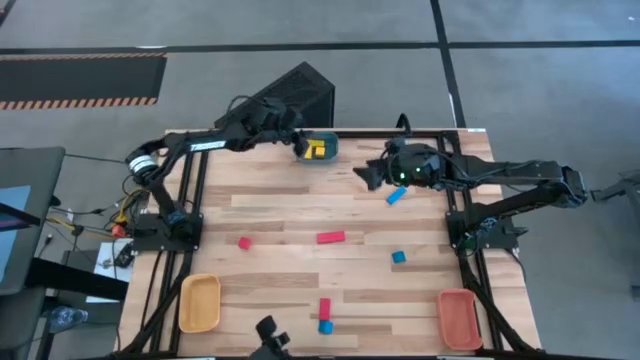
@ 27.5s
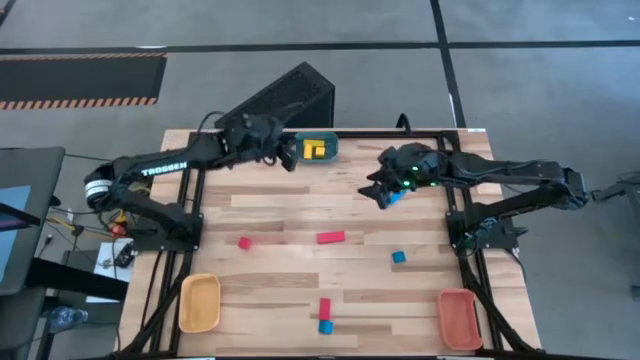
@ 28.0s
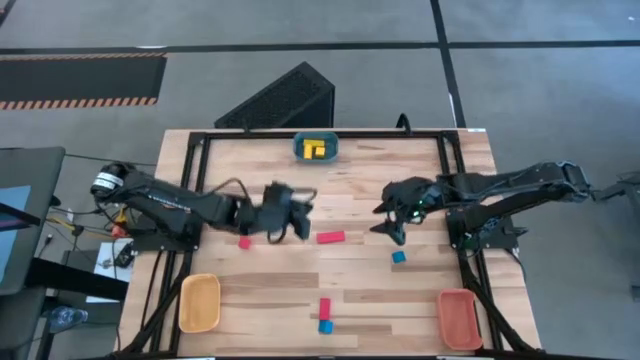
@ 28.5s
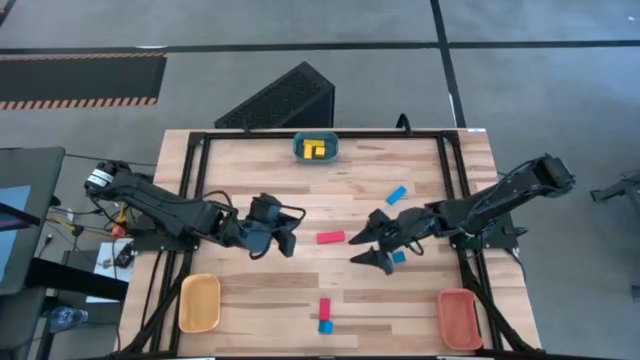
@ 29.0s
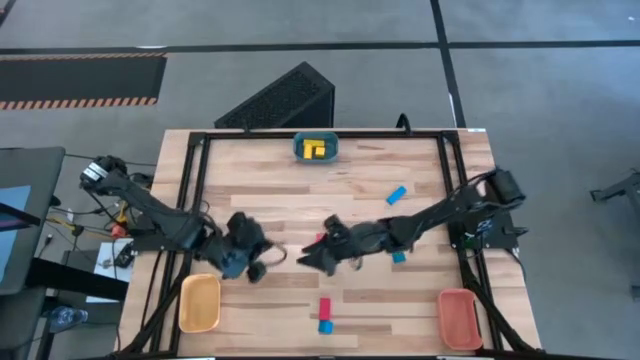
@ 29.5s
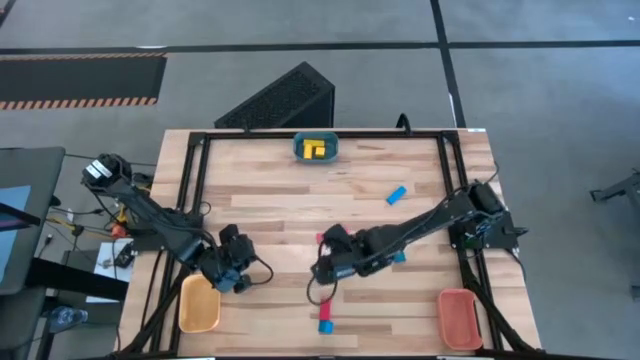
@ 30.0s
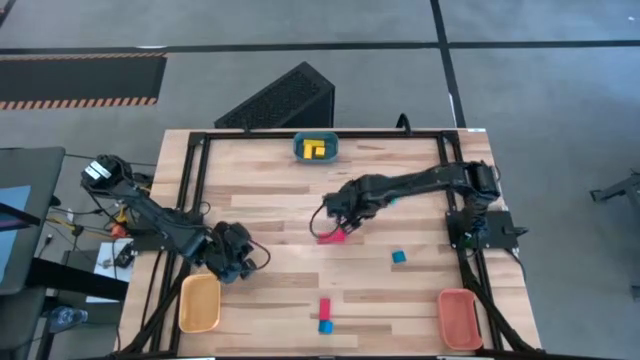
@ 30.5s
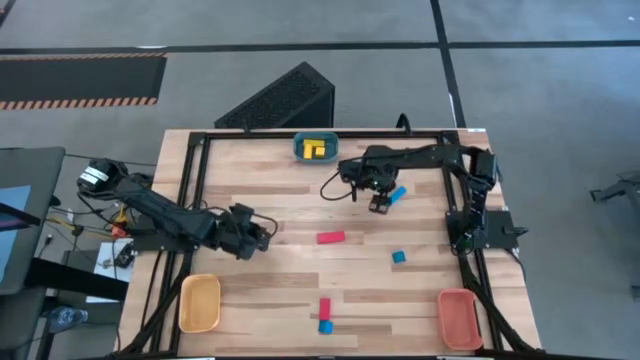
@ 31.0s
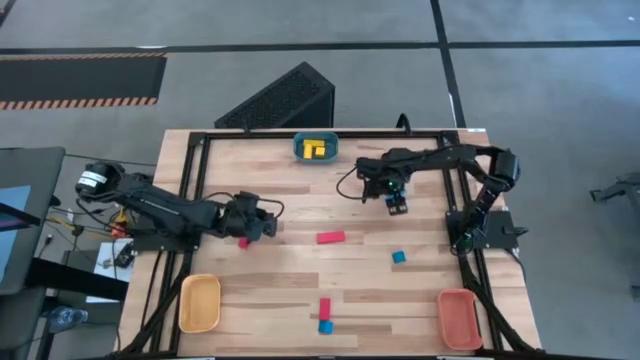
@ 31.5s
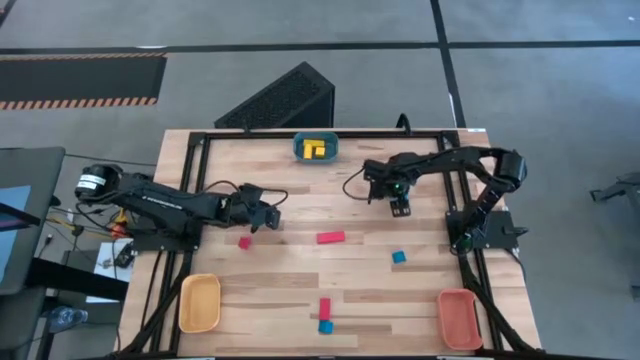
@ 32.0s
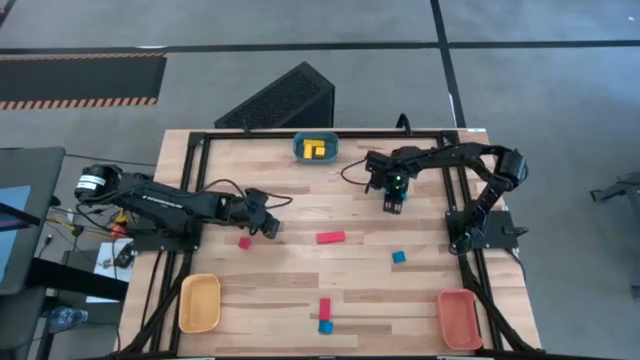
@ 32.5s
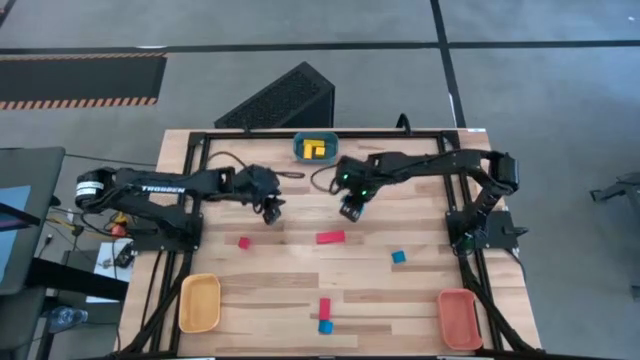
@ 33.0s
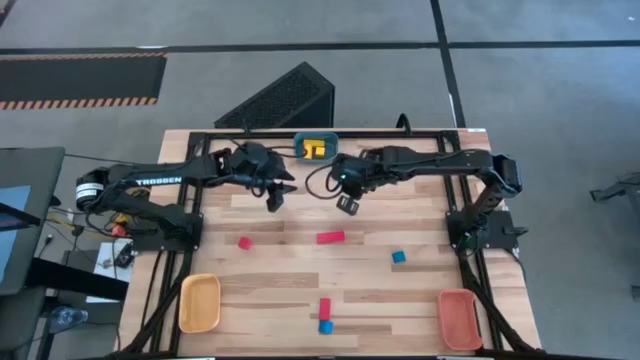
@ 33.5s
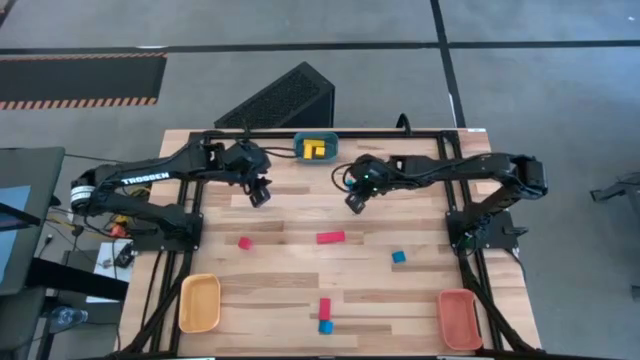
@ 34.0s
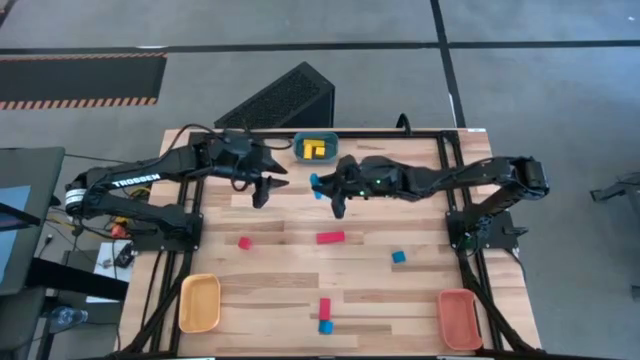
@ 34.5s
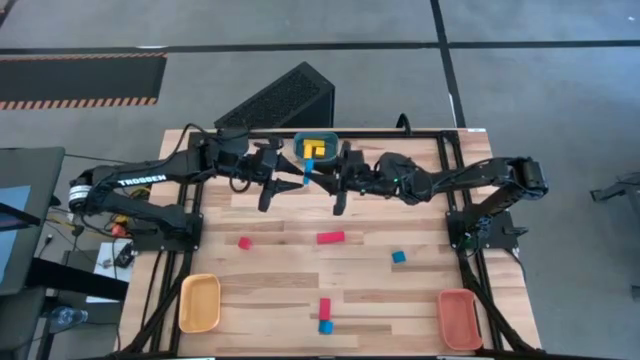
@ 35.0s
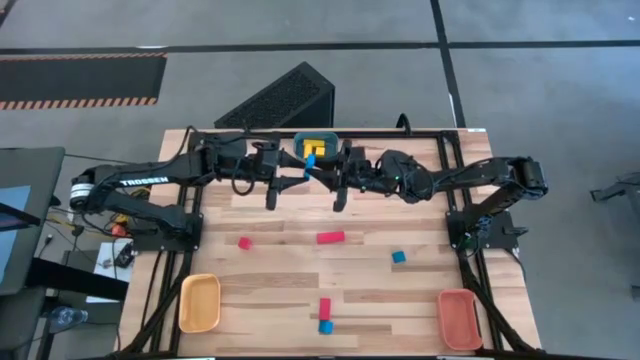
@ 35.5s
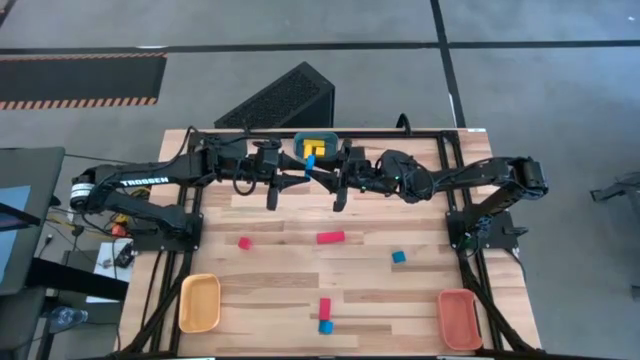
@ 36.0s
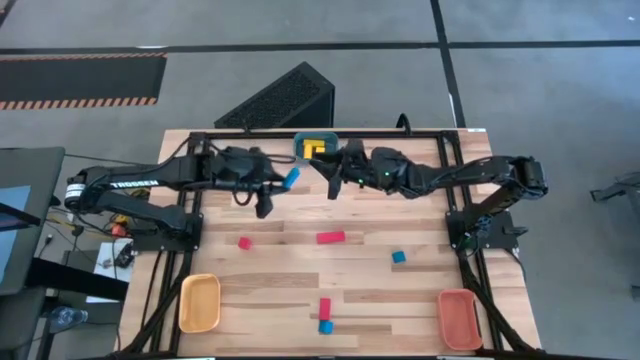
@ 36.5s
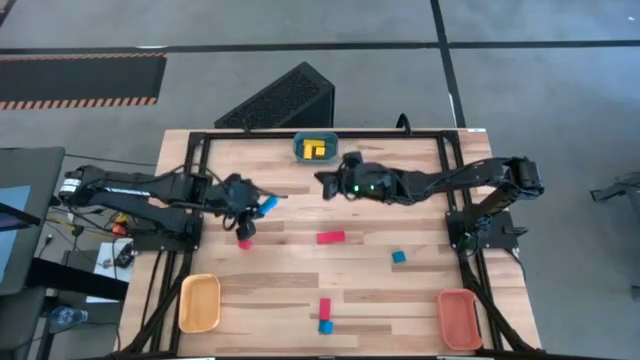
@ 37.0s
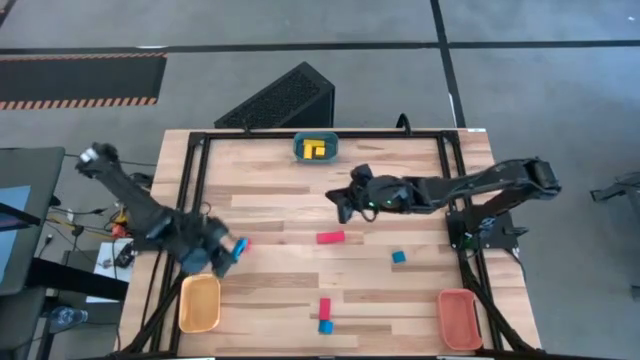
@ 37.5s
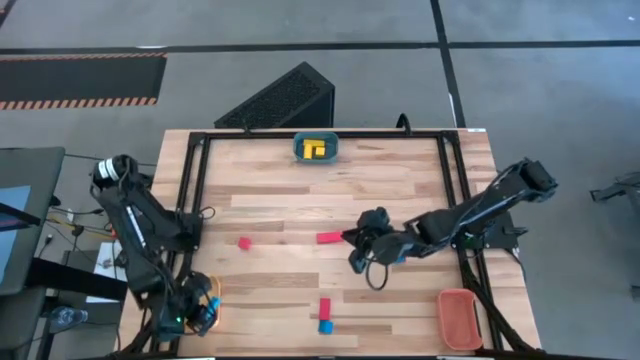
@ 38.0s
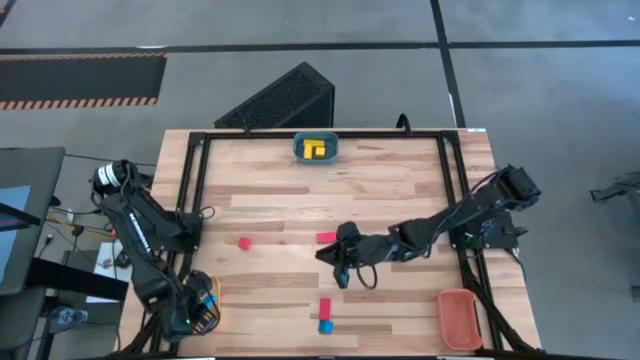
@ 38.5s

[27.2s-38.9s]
Task: Sort & place blocks by color
Put the top right blue block into the yellow bin

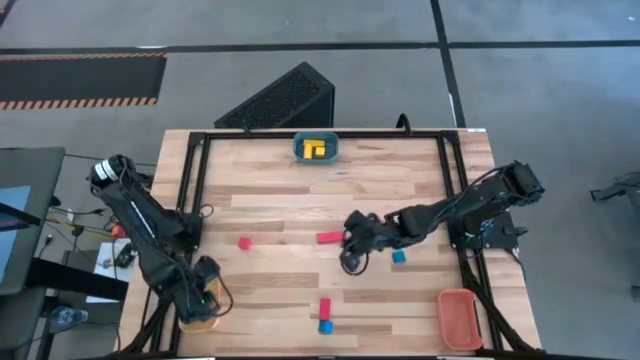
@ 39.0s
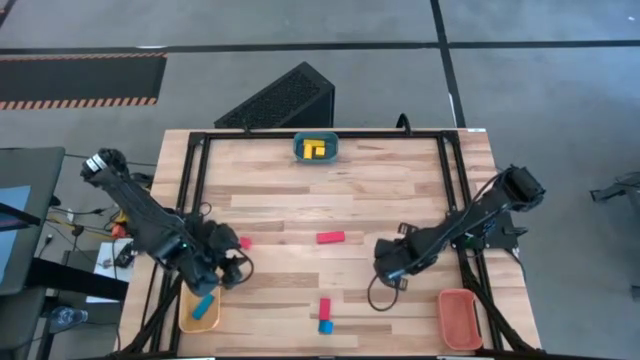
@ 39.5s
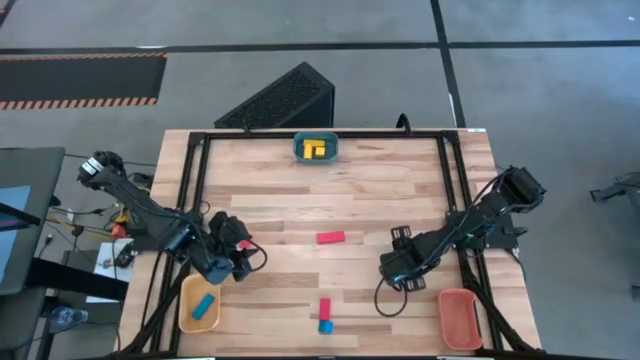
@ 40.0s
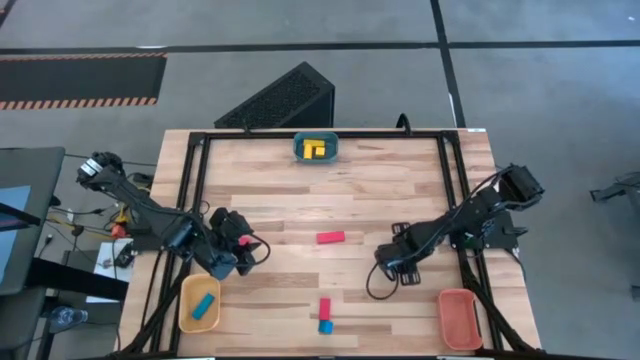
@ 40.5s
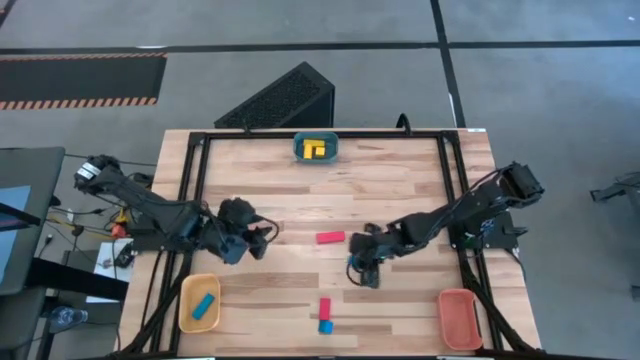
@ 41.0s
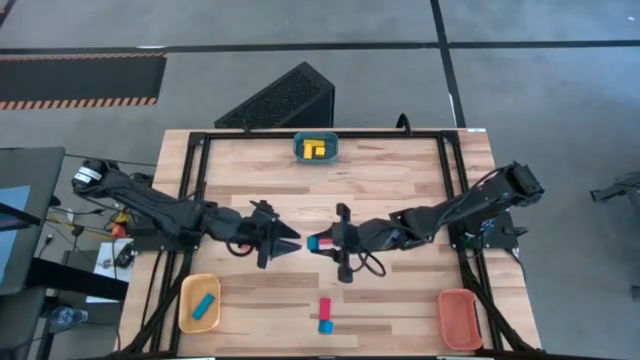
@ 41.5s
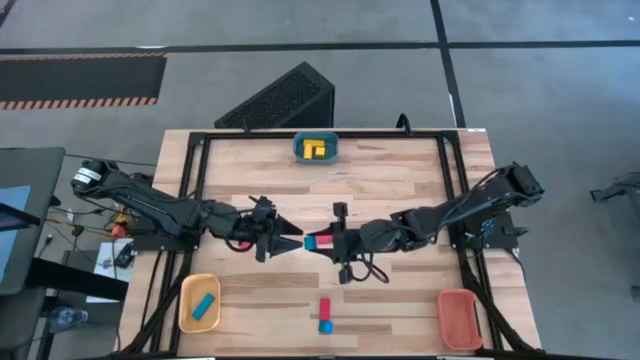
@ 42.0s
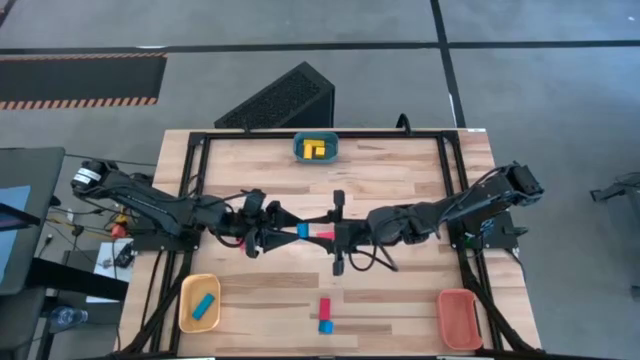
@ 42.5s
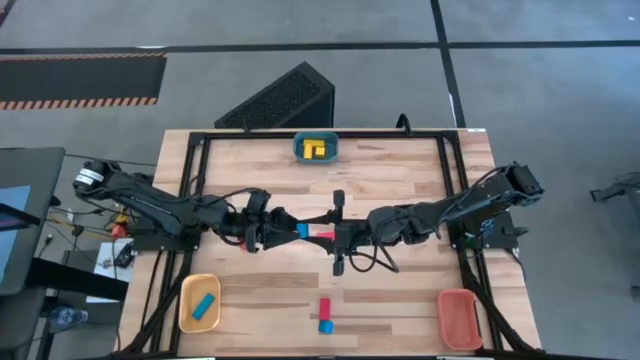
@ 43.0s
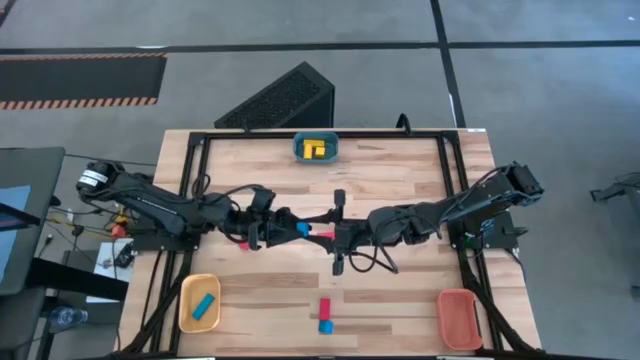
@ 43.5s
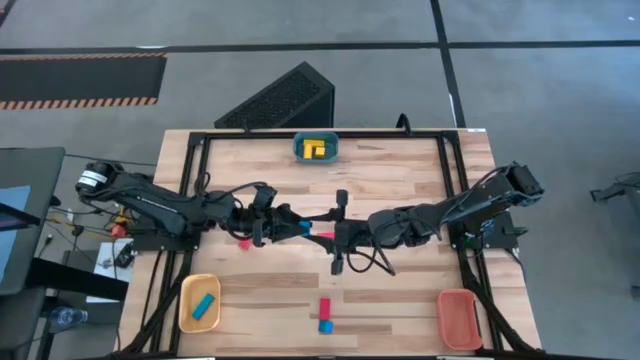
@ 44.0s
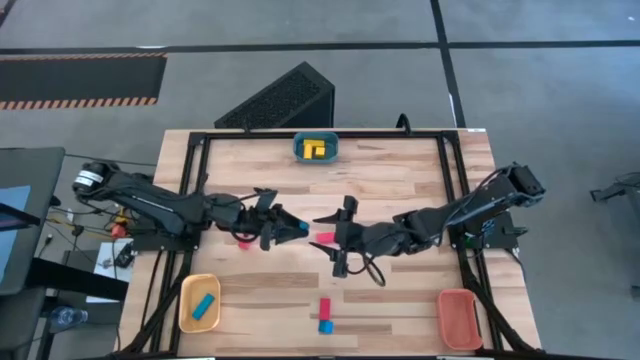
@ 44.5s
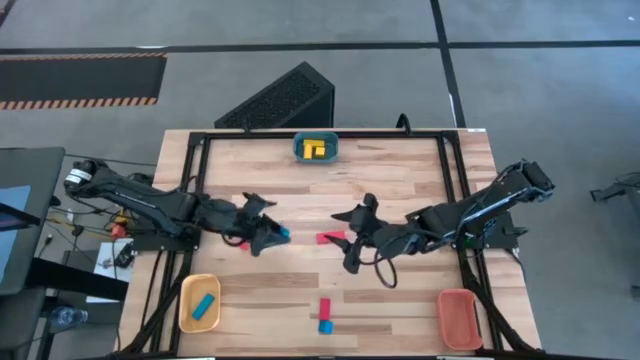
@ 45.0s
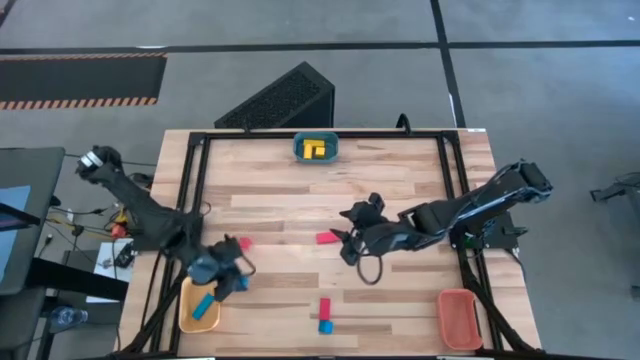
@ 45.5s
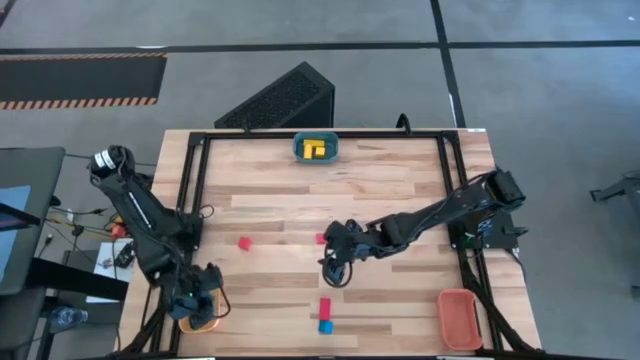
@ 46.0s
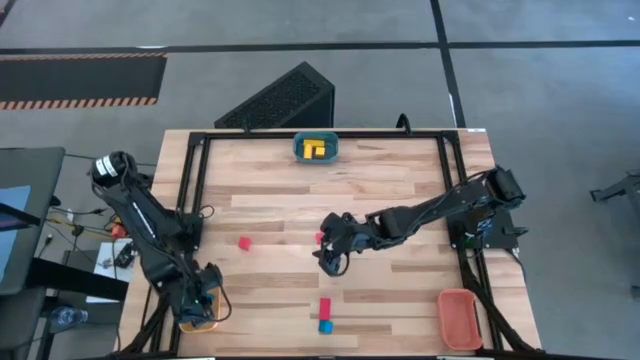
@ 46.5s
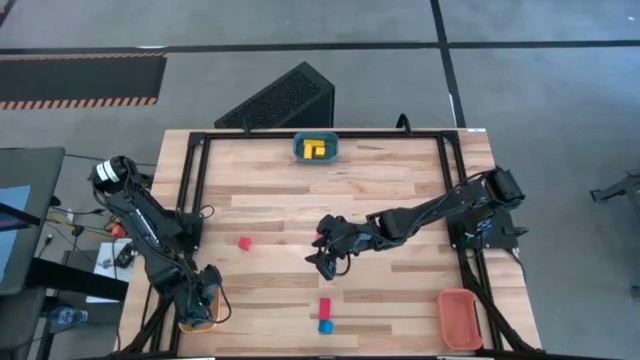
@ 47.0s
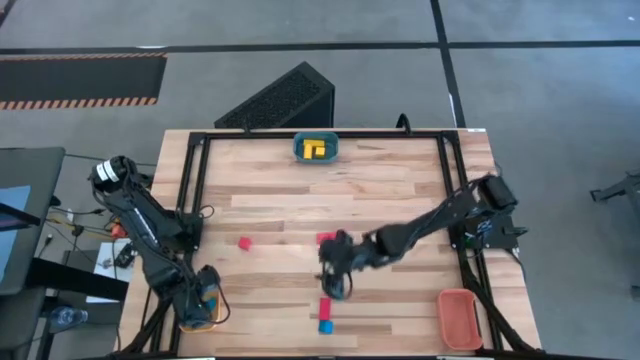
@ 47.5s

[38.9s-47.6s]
Put the right blue block into the yellow bin

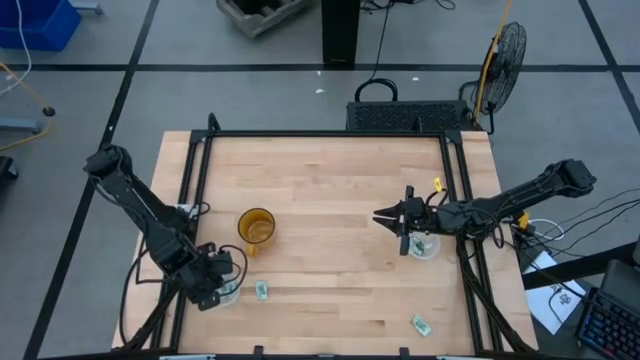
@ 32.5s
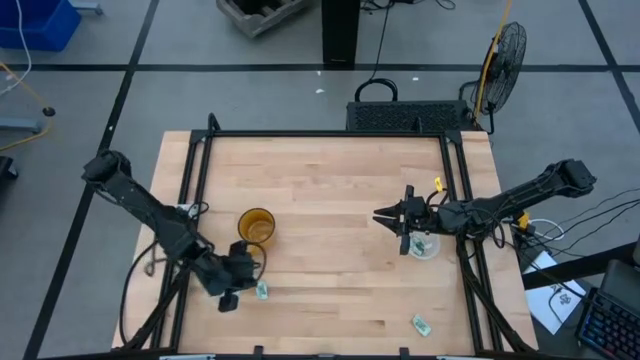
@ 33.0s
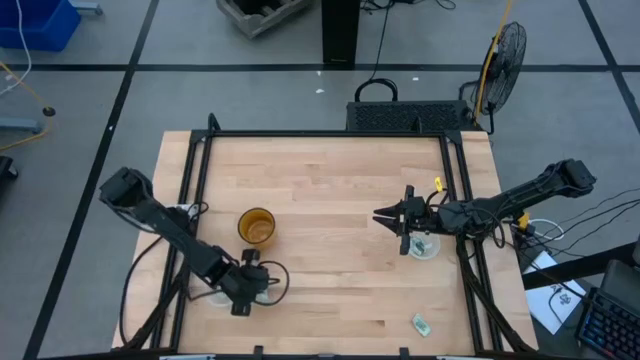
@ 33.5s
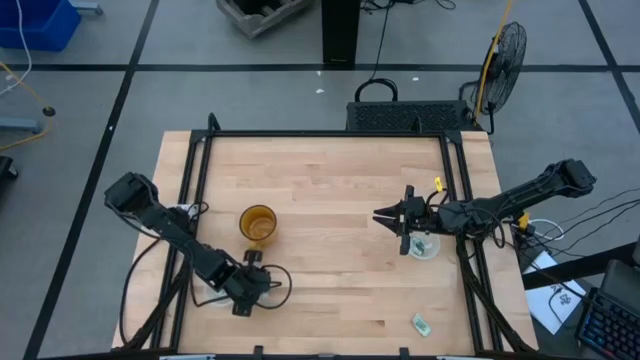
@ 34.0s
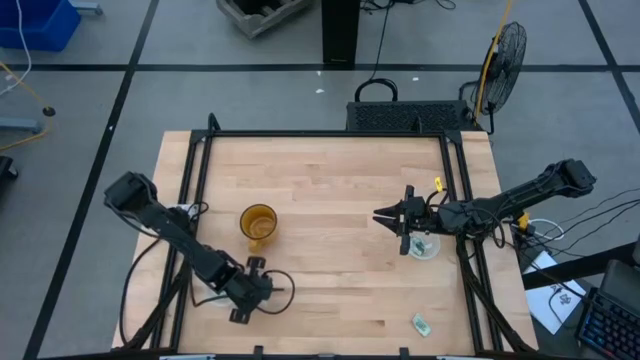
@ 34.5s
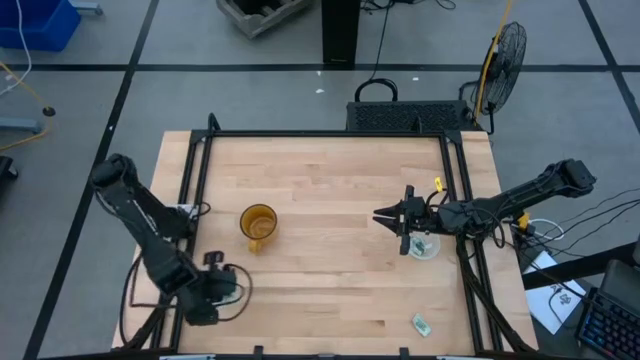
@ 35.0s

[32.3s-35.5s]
Task: Pick and place Stevia / Truvia into bins
Put the stevia packet into the left transparent container
